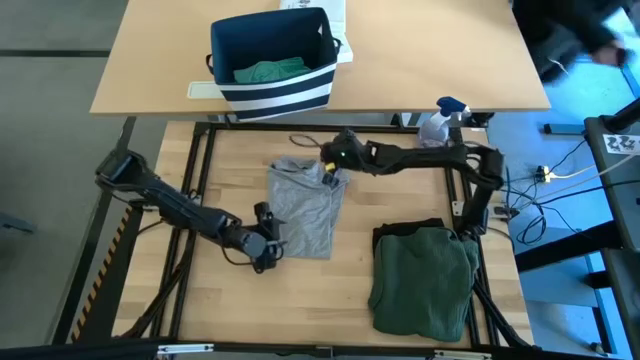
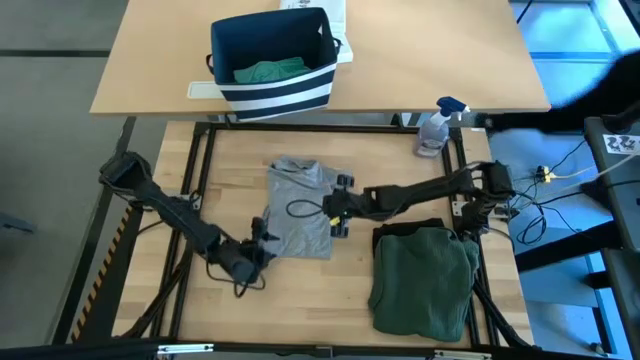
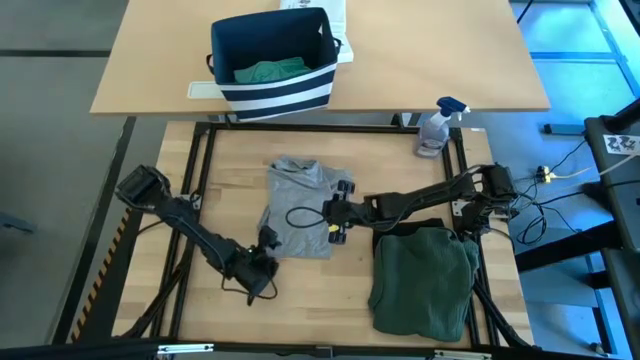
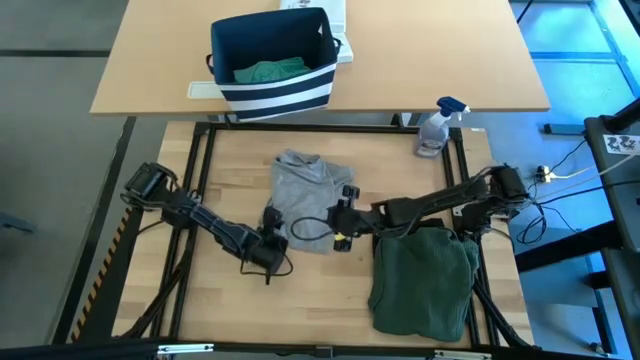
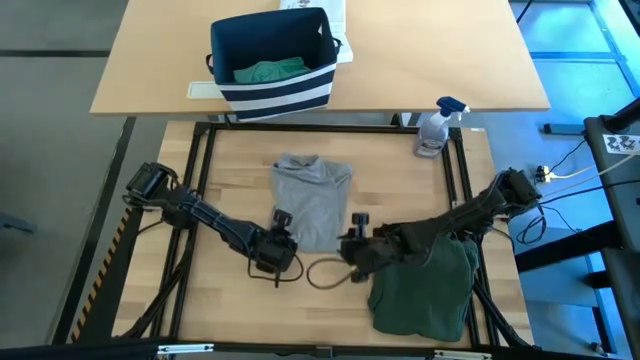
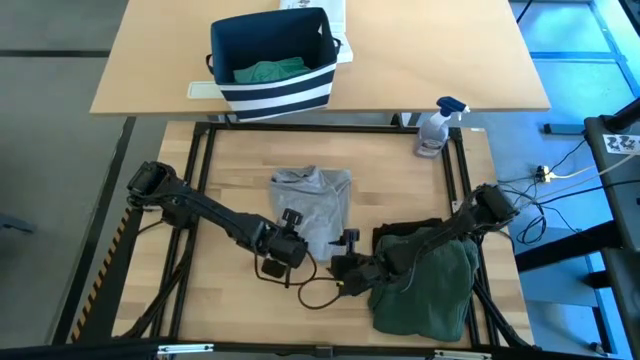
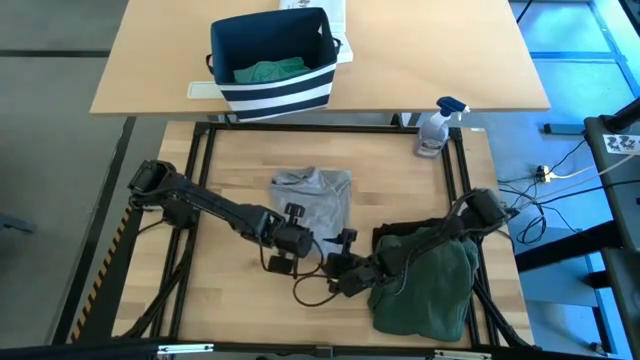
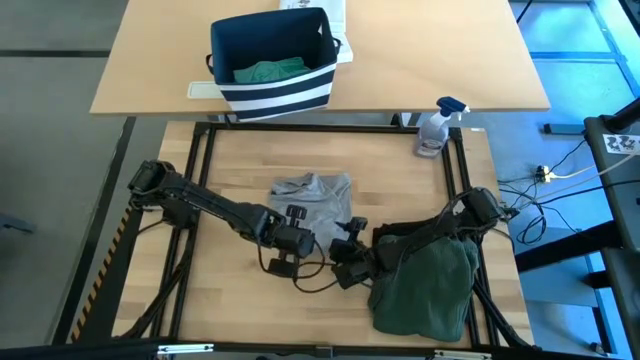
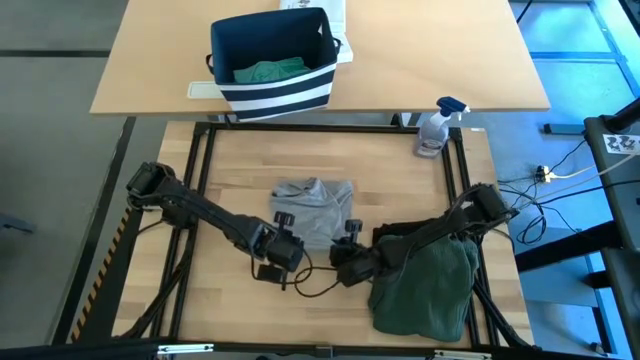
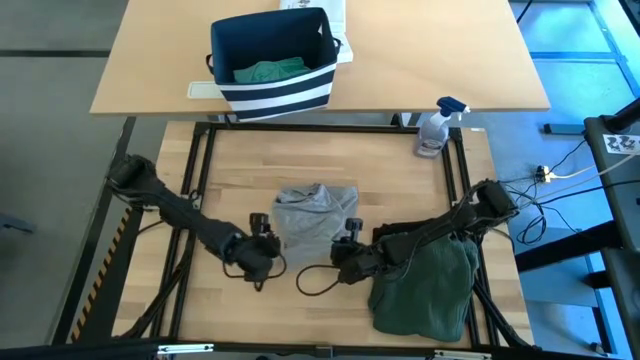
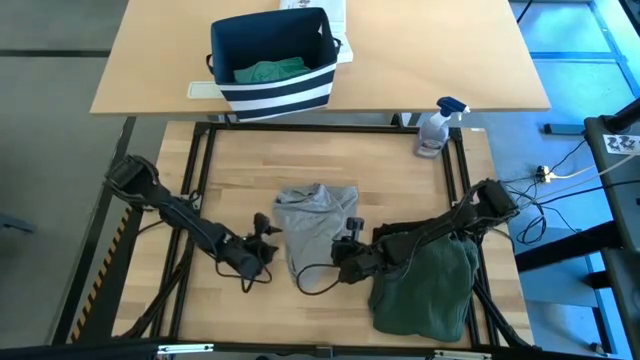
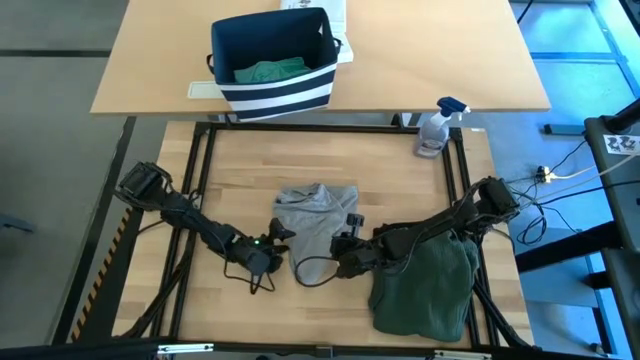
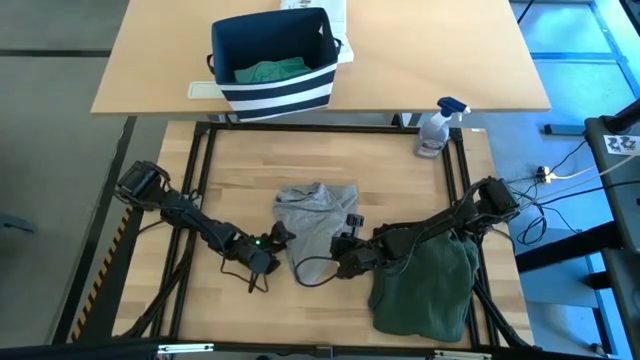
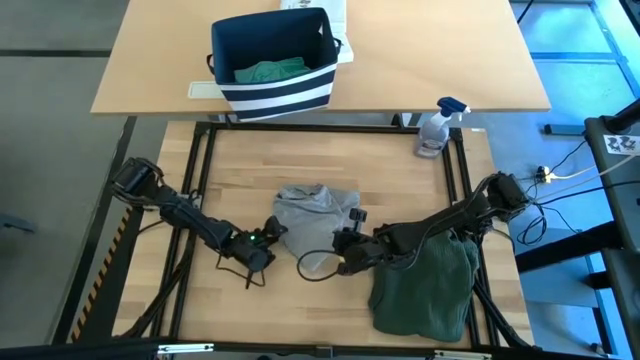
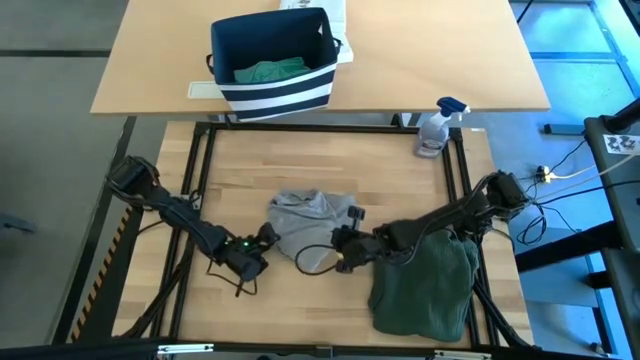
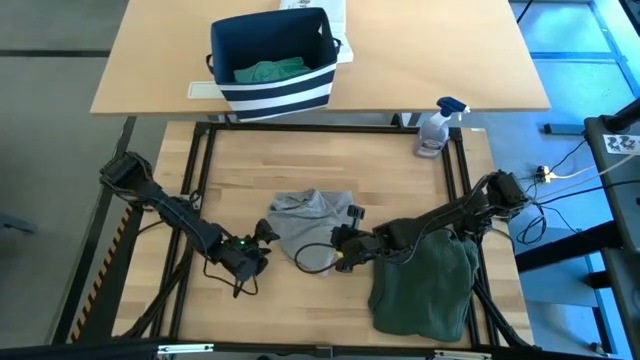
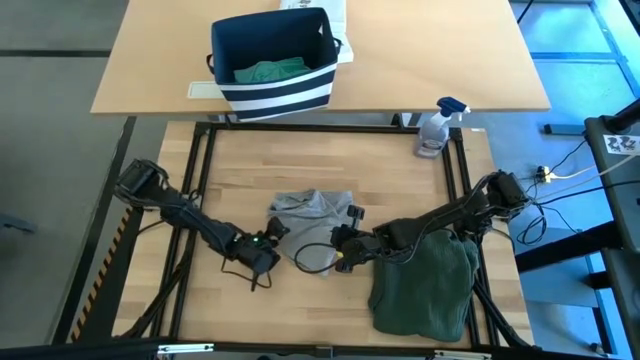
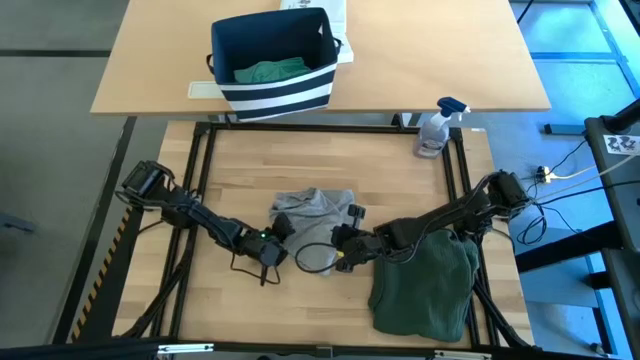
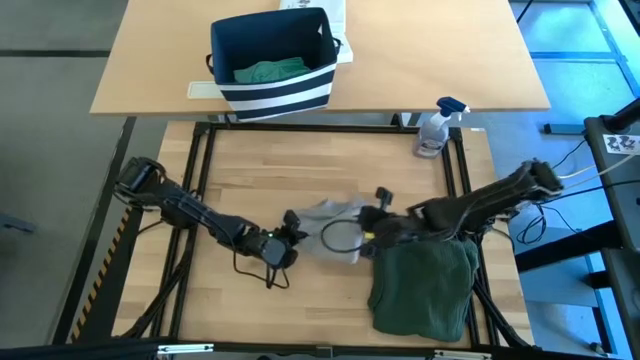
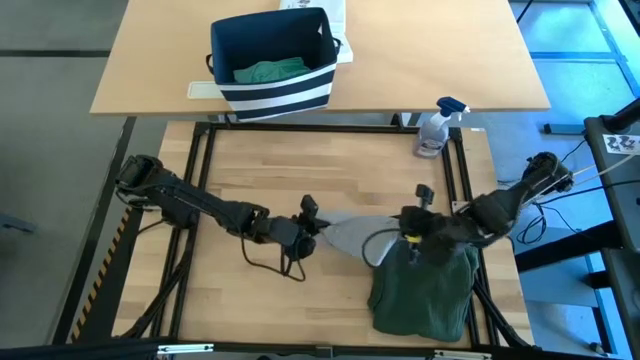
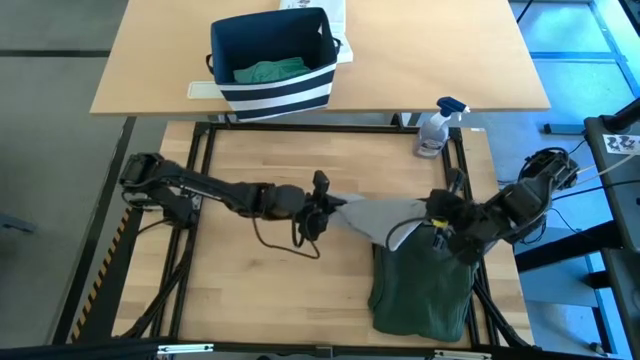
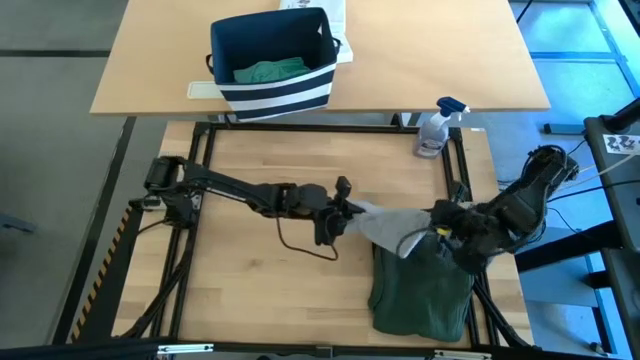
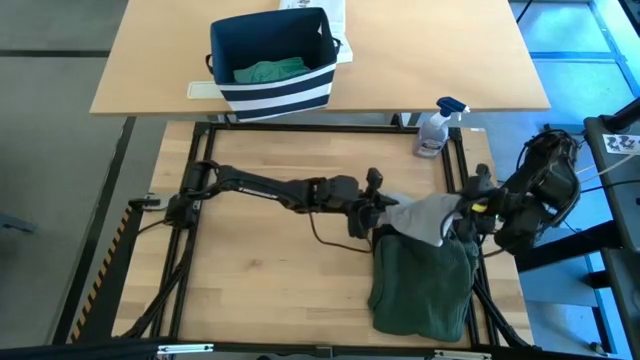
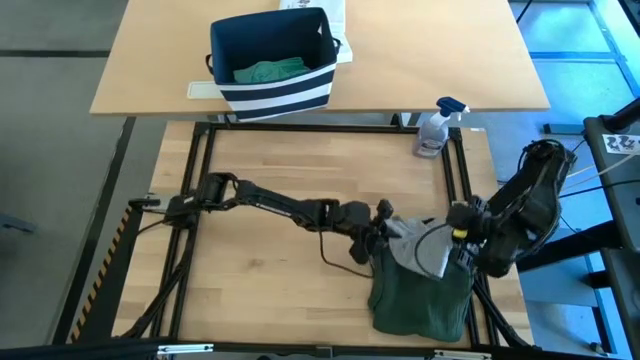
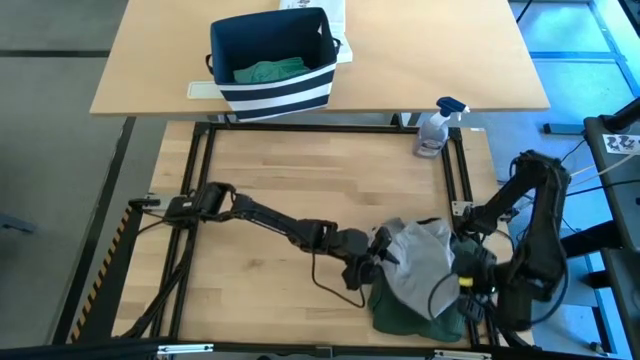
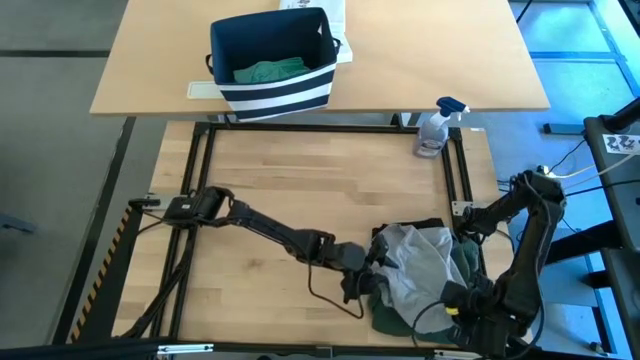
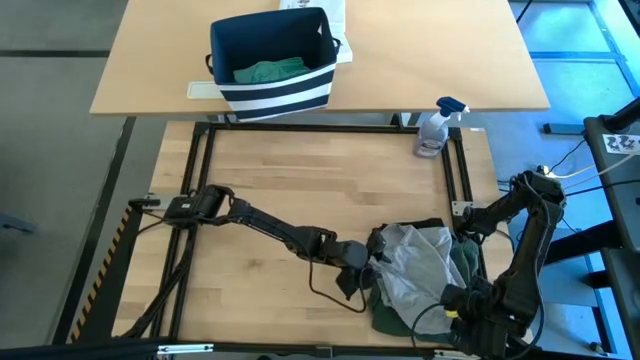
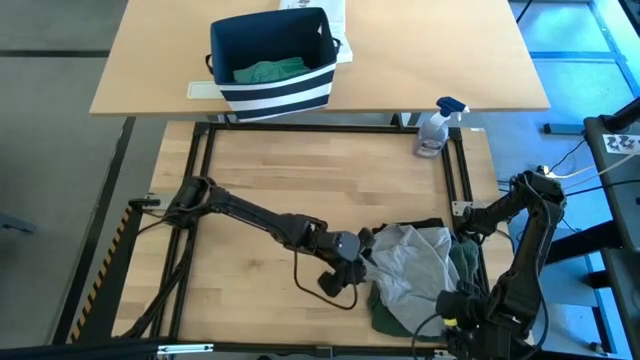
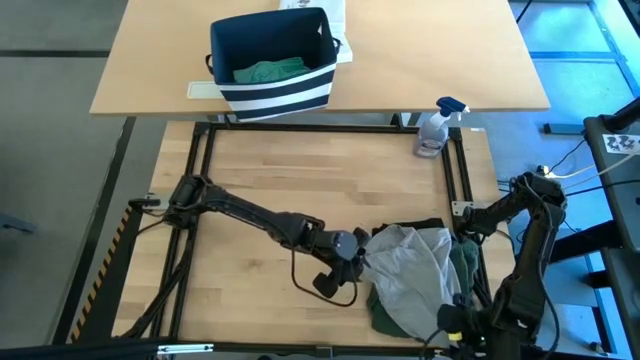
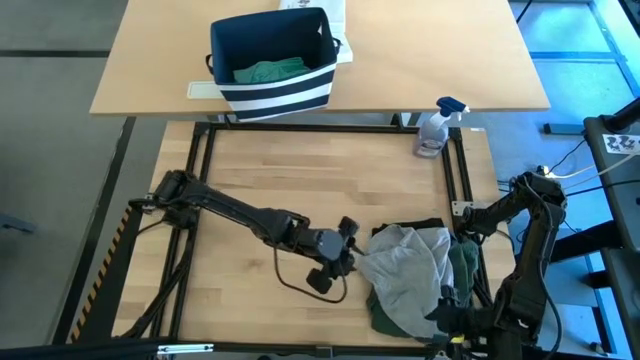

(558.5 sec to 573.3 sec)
Task: Fold Laundry from Bin
Stack the folded gray shirt on top of the folded green polo shirt

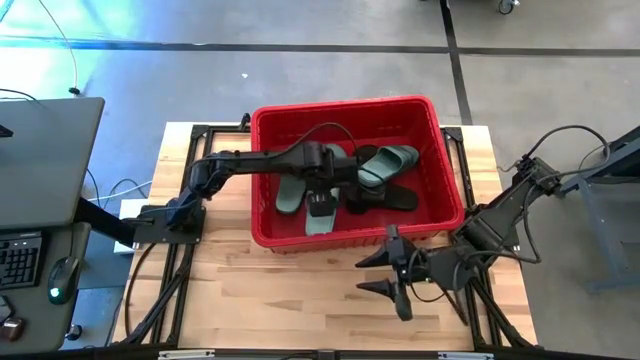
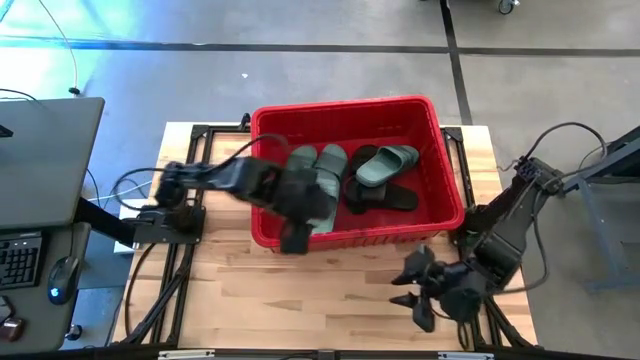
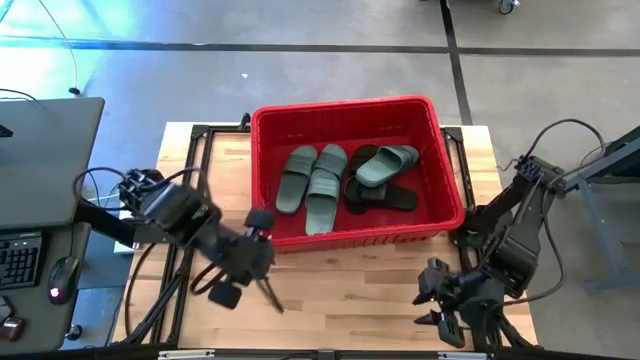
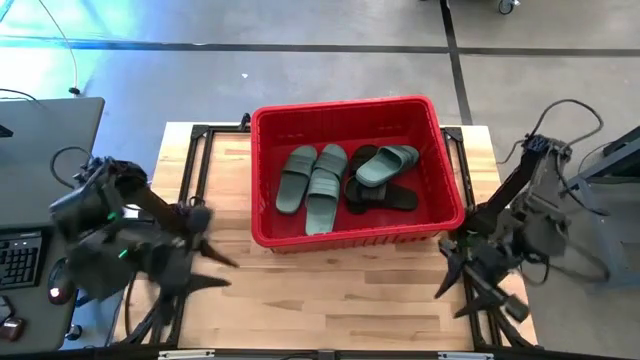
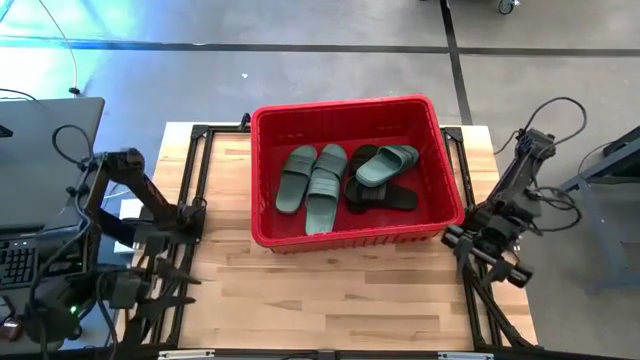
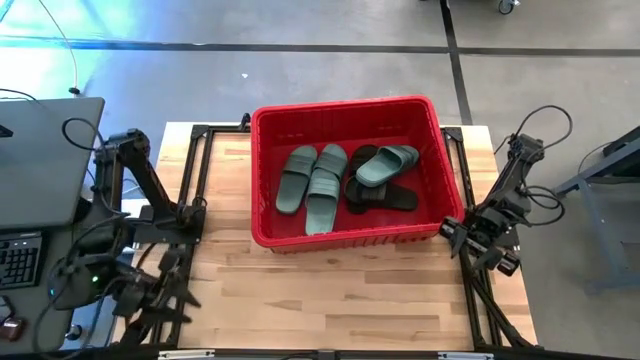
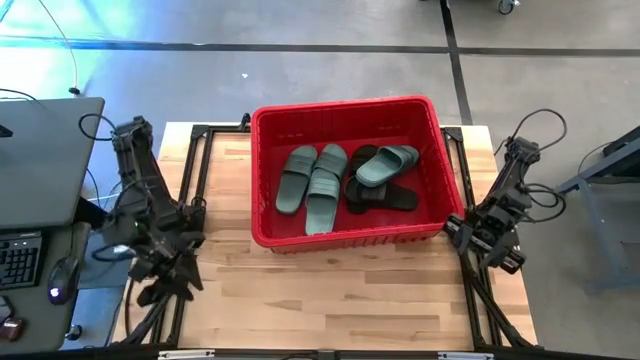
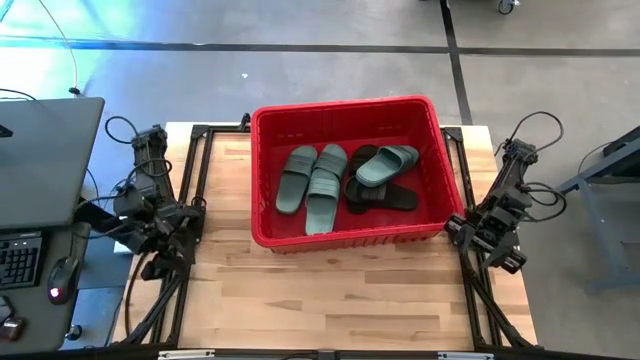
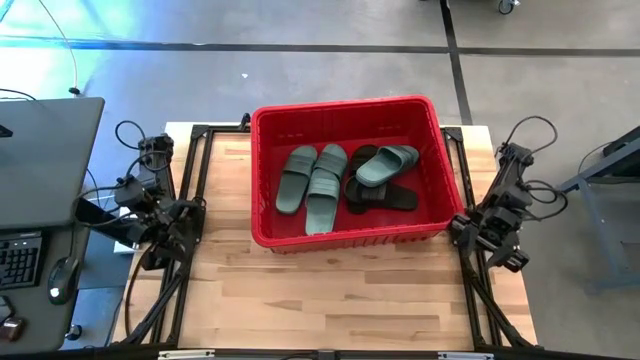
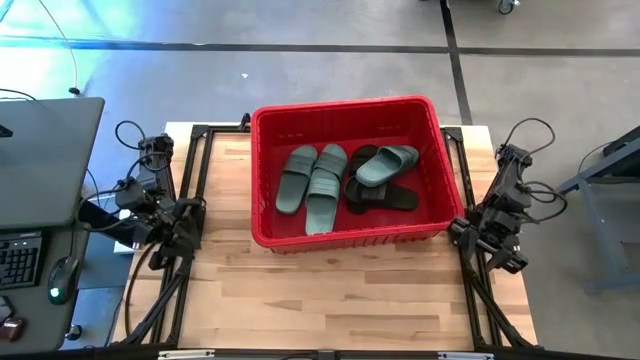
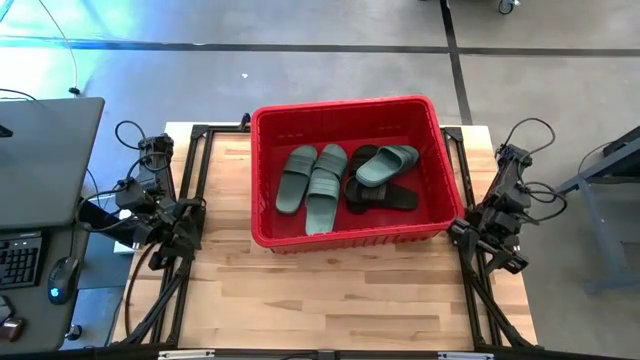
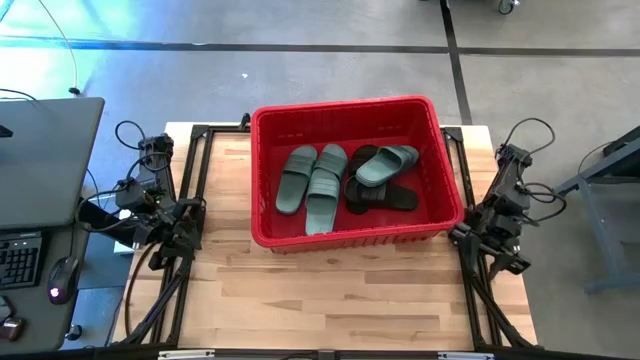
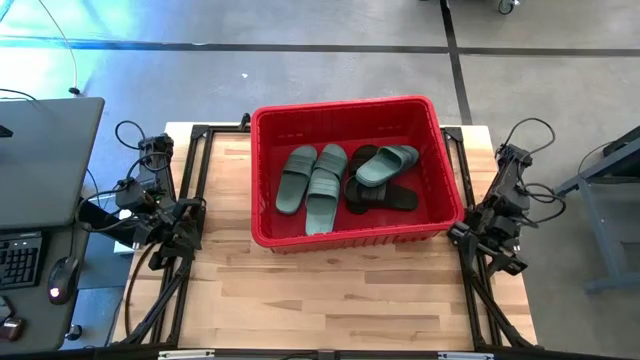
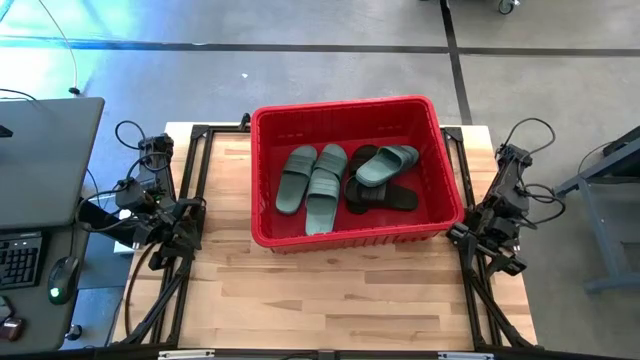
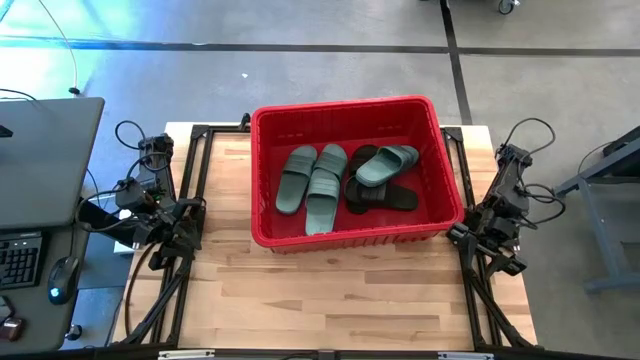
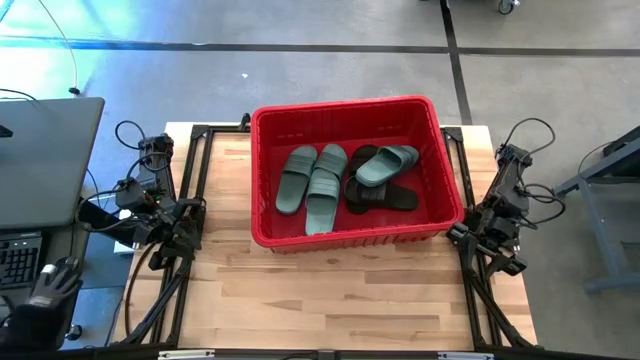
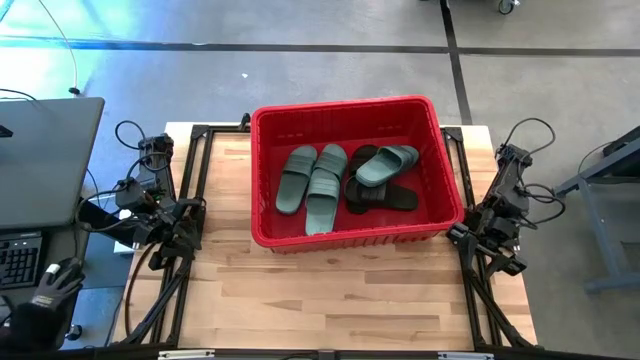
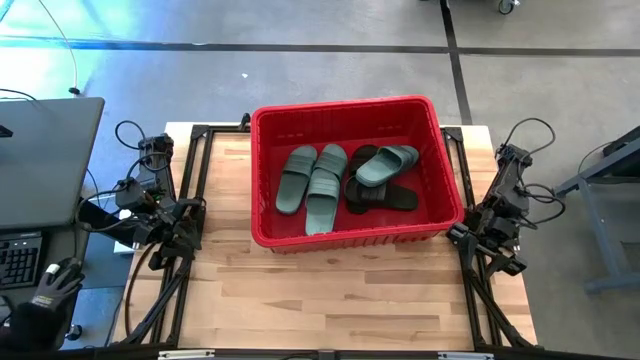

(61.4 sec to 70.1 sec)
Task: Pick and place slides into bin
Return to Home Position
